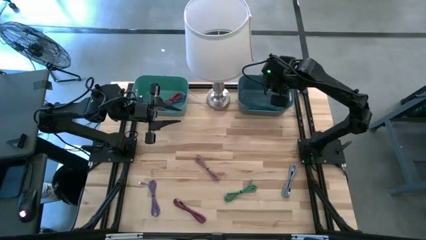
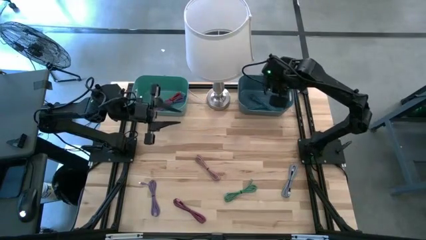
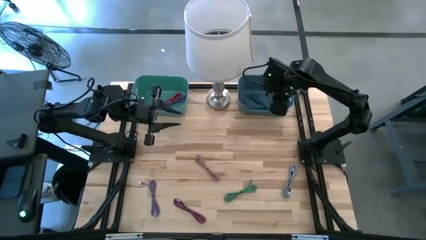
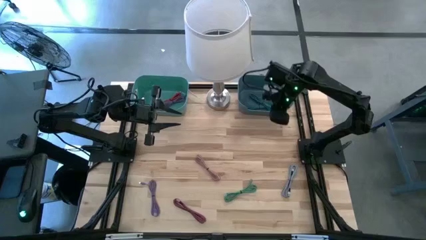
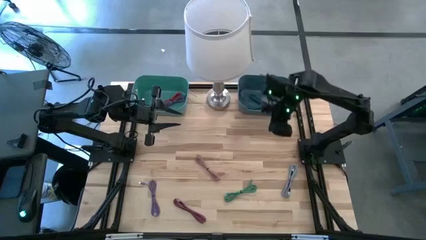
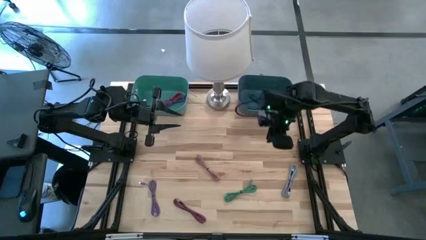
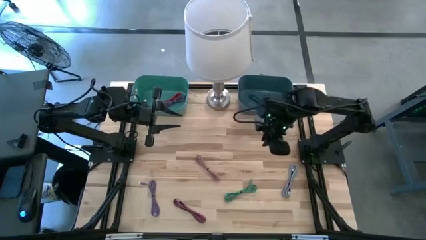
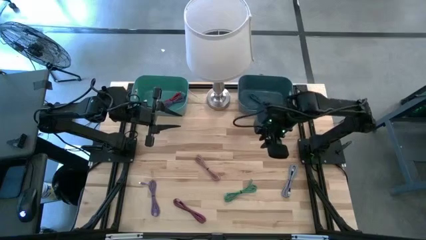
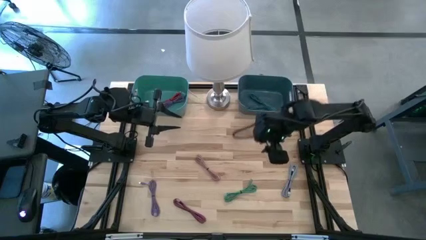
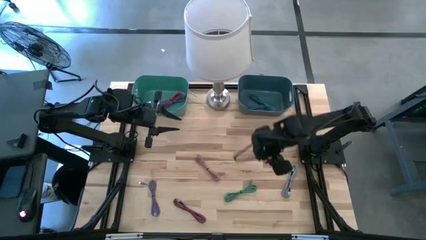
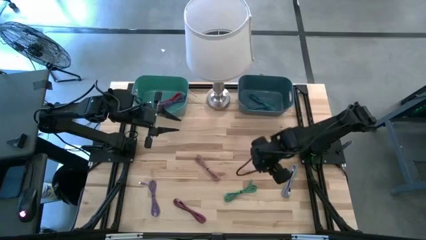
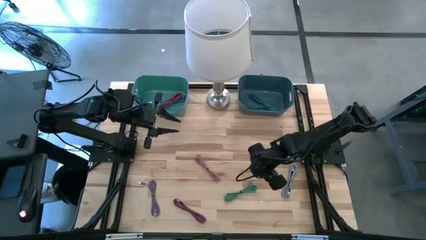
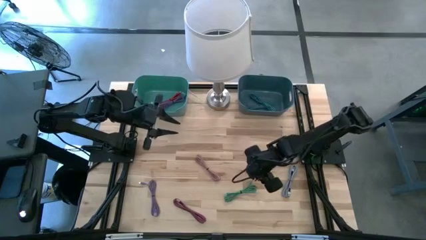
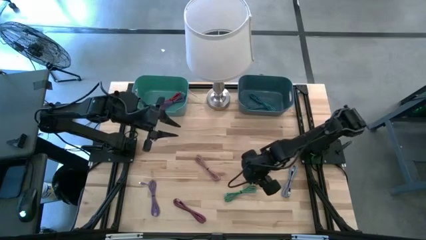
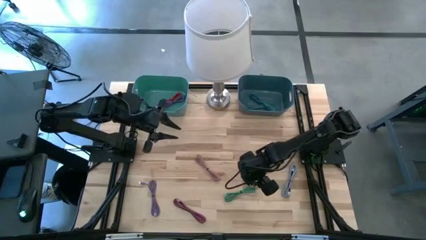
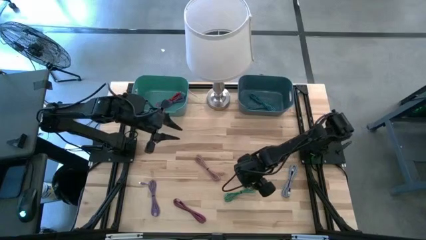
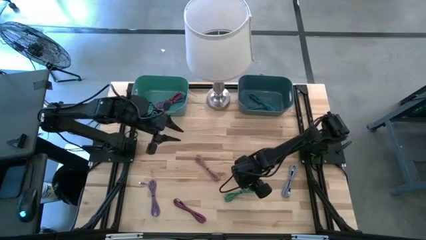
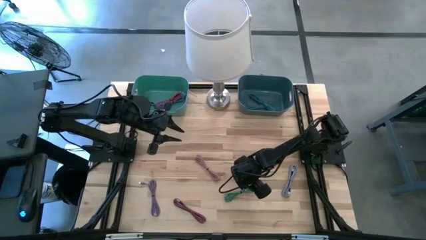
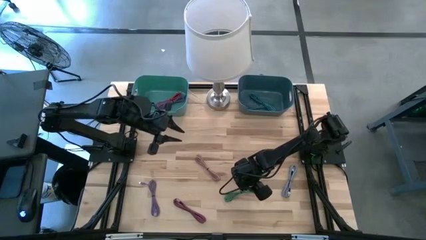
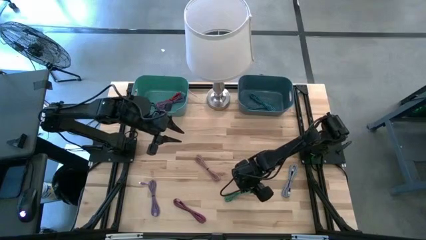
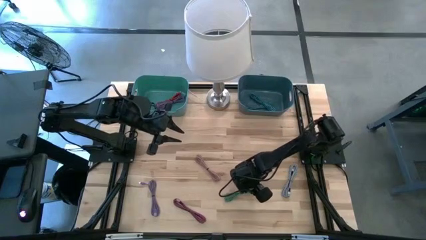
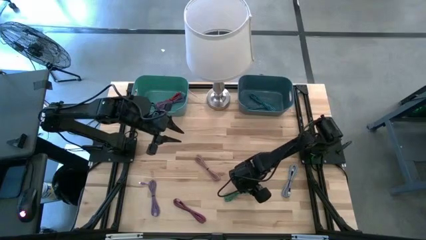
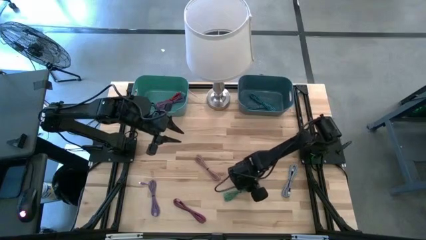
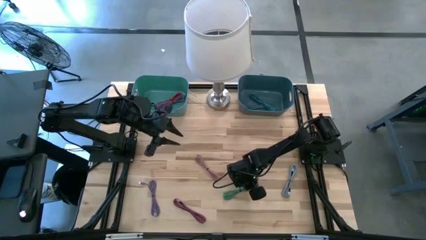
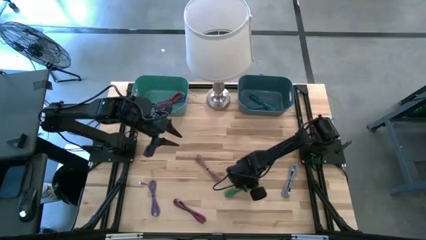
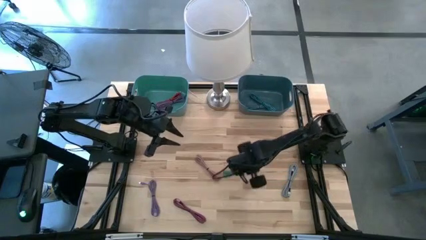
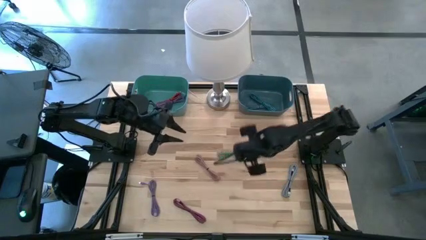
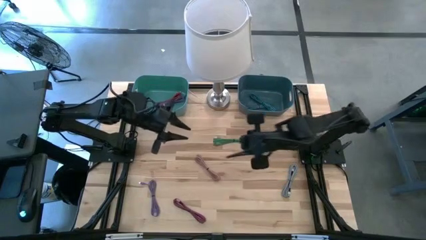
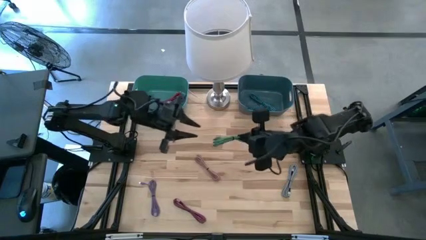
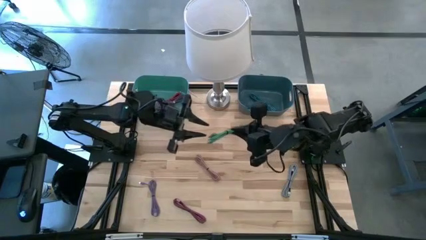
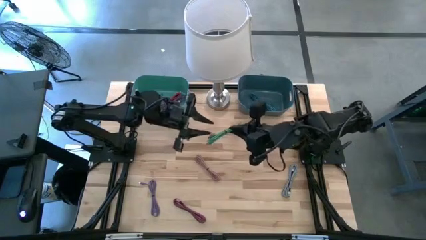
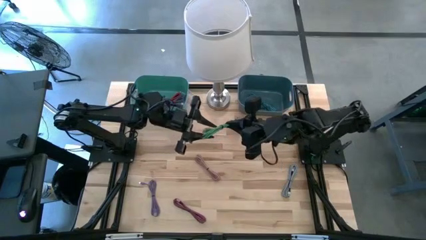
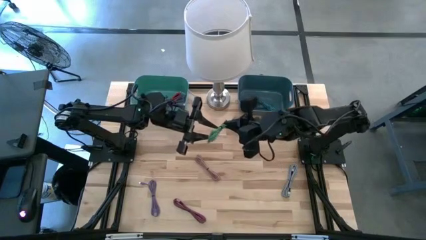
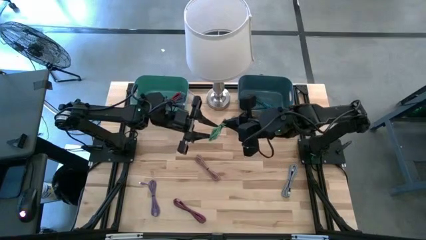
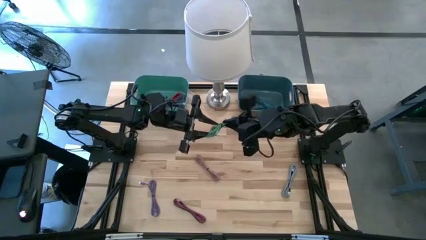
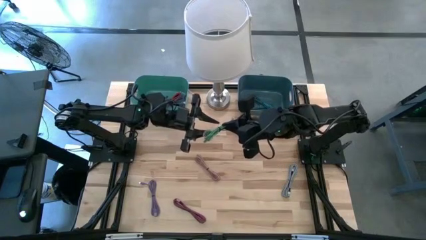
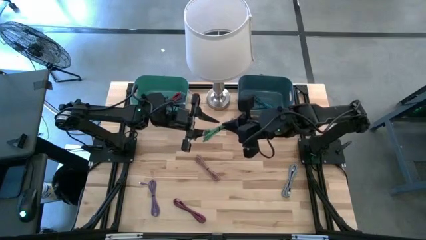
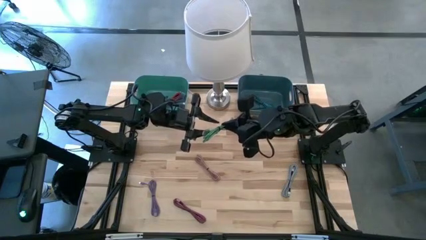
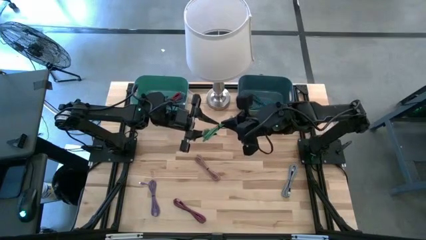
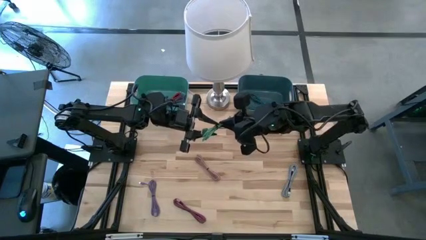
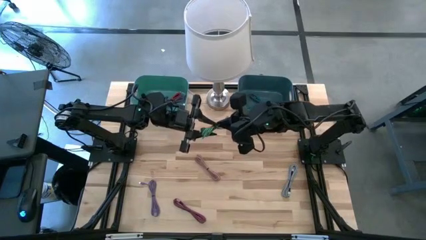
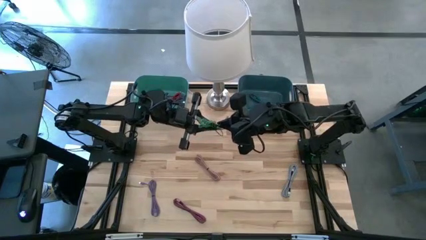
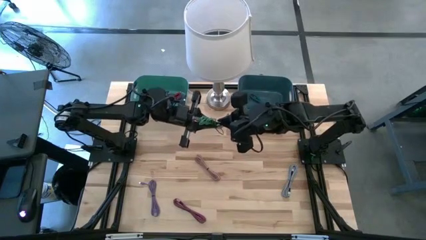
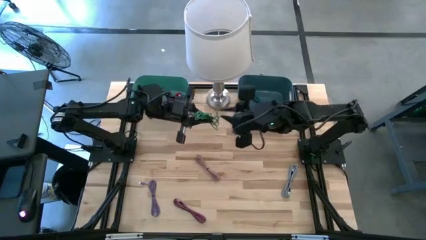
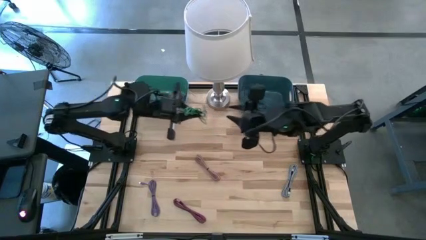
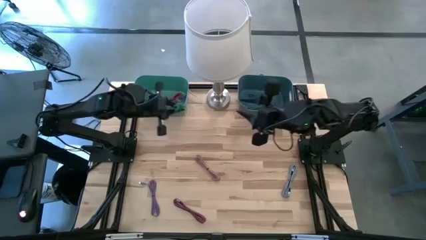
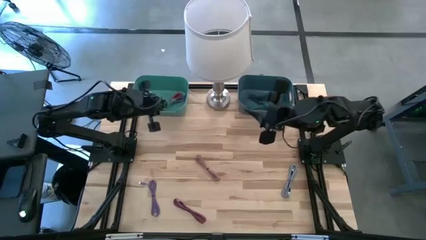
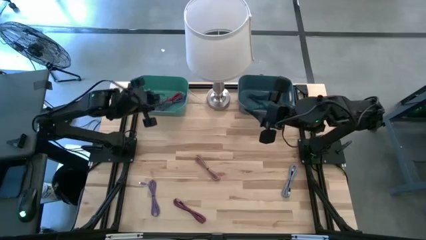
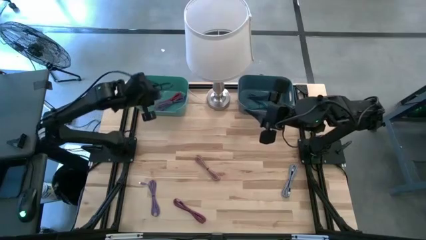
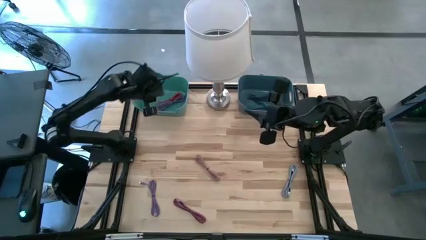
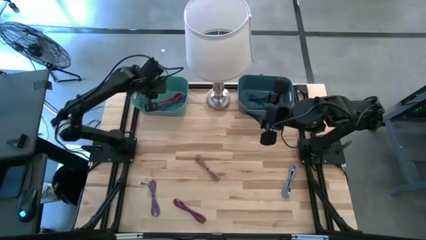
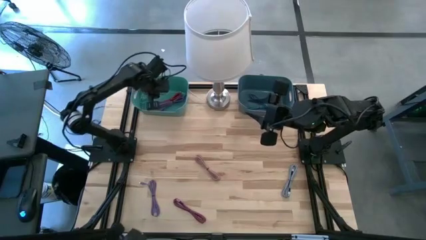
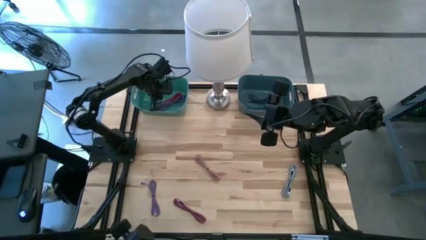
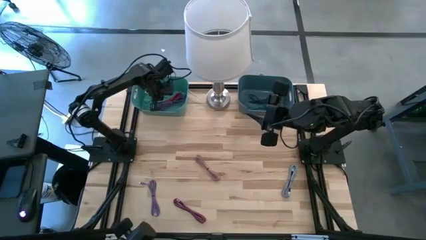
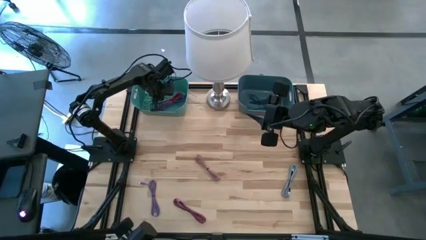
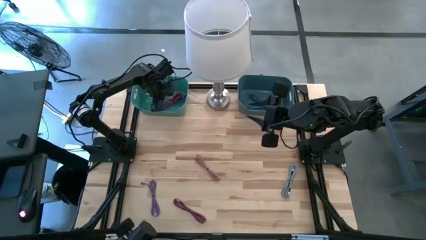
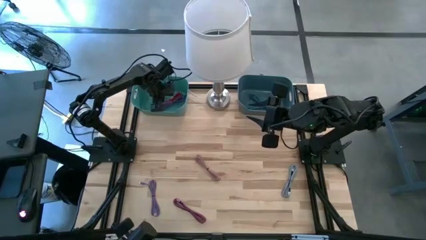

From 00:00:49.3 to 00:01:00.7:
Task: Pick & Place USB Port
Put the green charger cable into the green bin
